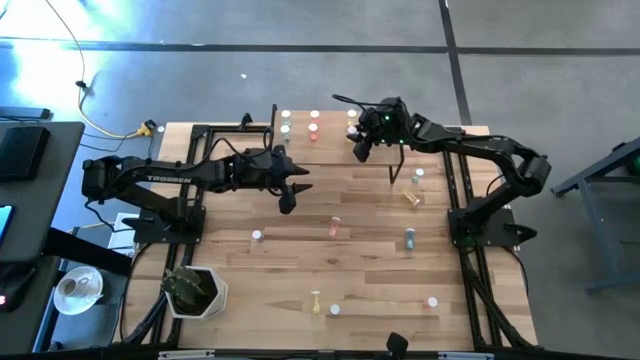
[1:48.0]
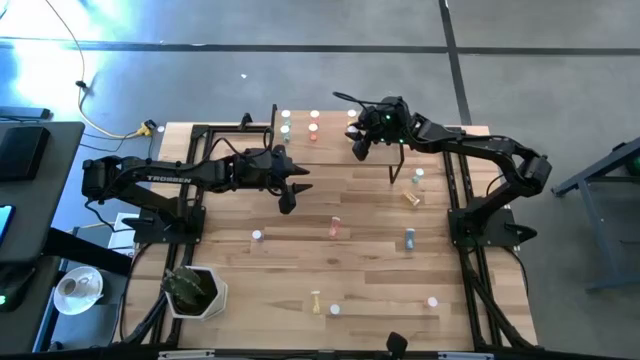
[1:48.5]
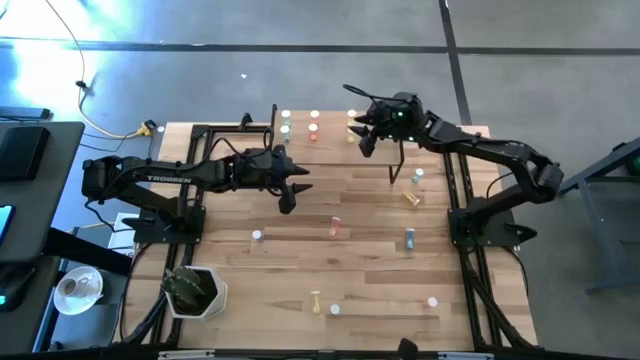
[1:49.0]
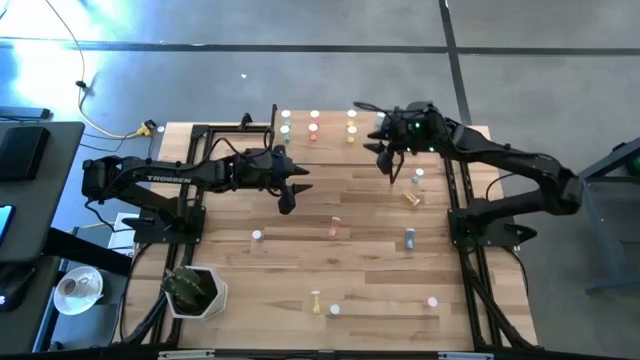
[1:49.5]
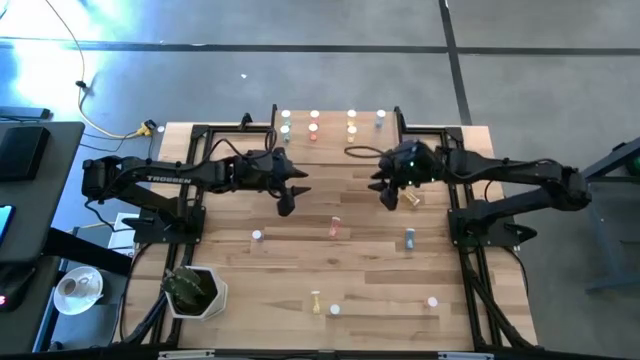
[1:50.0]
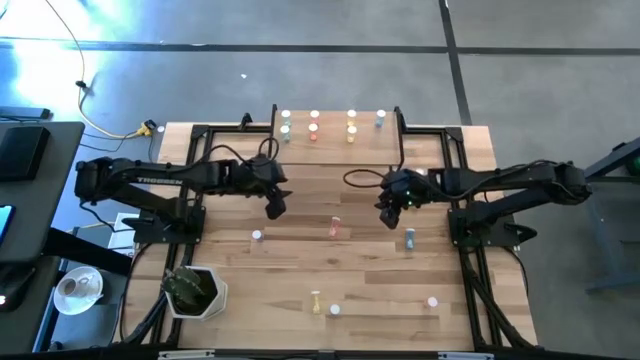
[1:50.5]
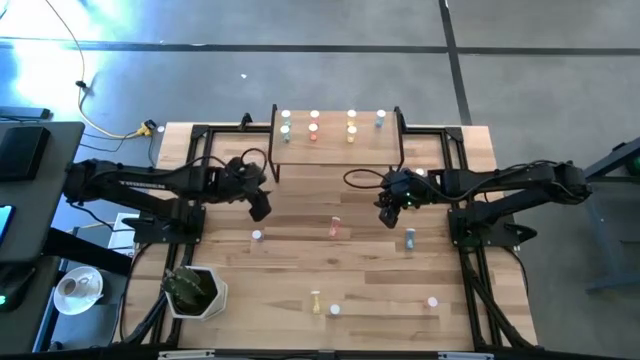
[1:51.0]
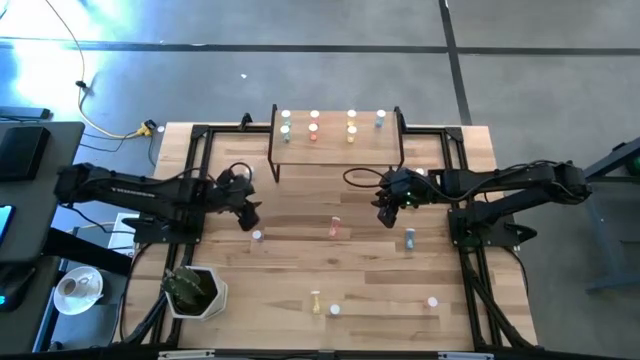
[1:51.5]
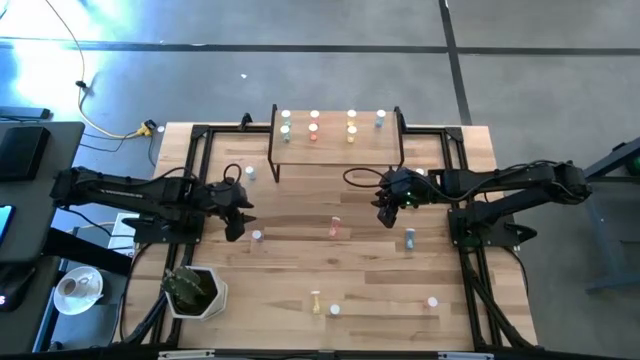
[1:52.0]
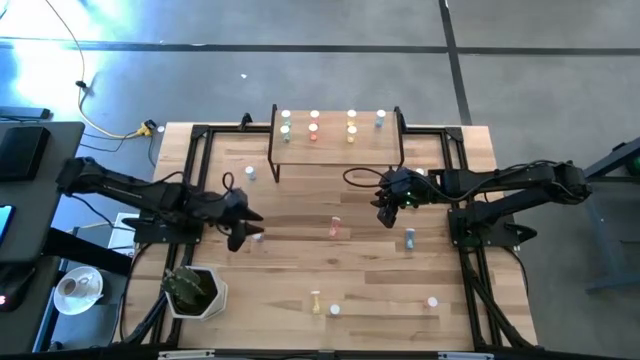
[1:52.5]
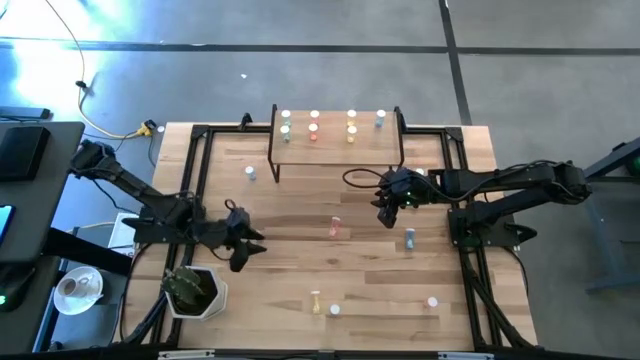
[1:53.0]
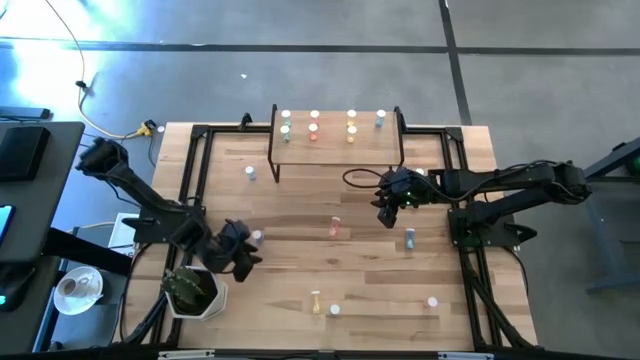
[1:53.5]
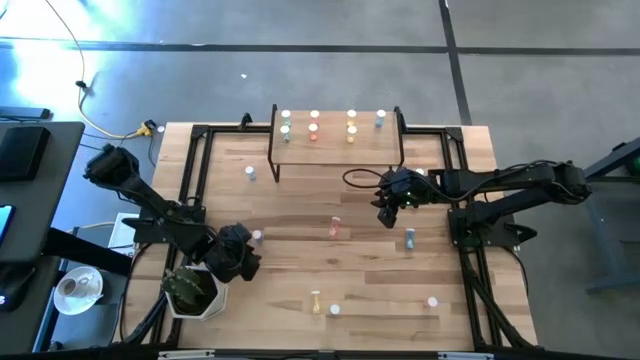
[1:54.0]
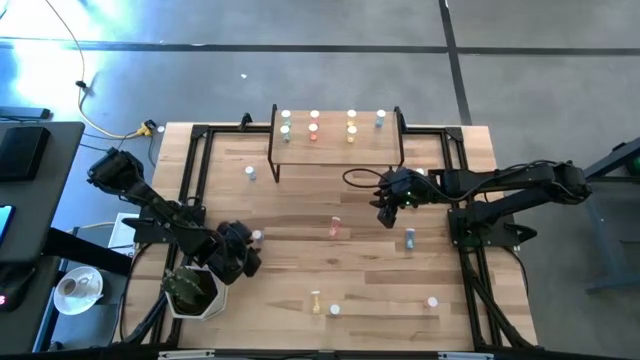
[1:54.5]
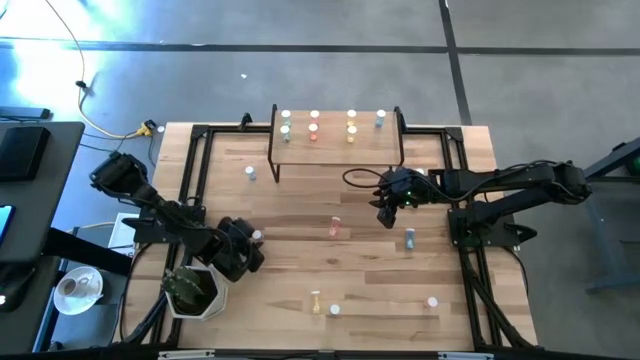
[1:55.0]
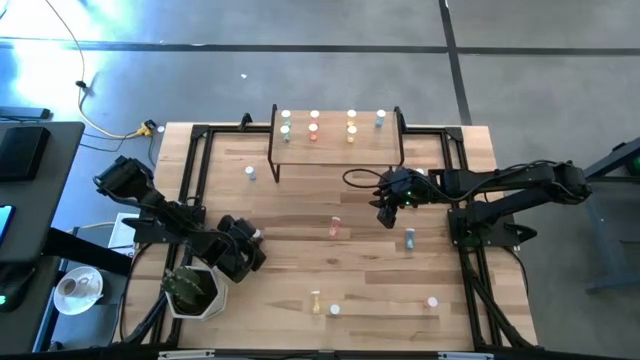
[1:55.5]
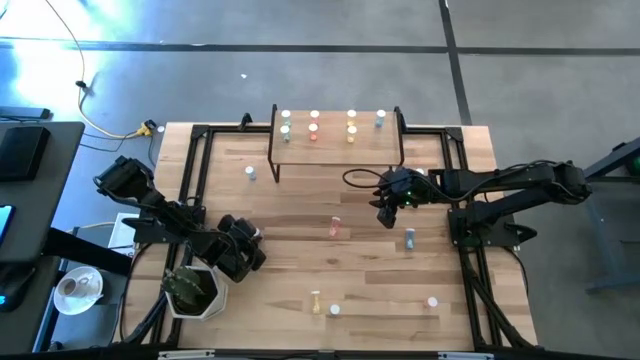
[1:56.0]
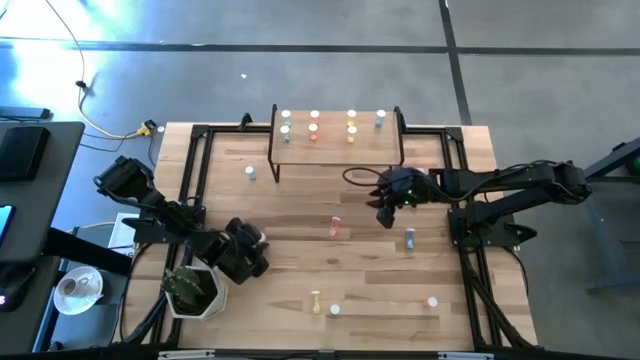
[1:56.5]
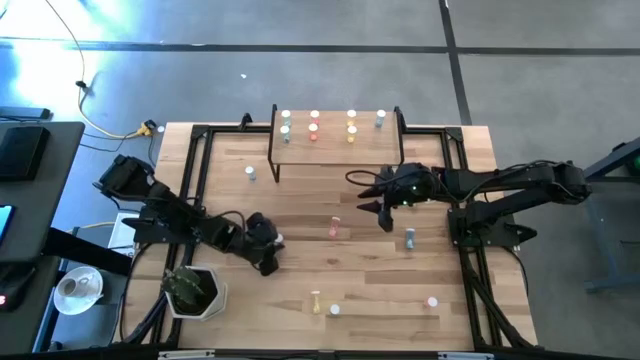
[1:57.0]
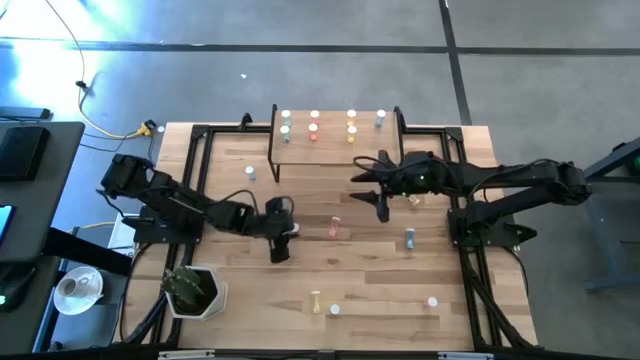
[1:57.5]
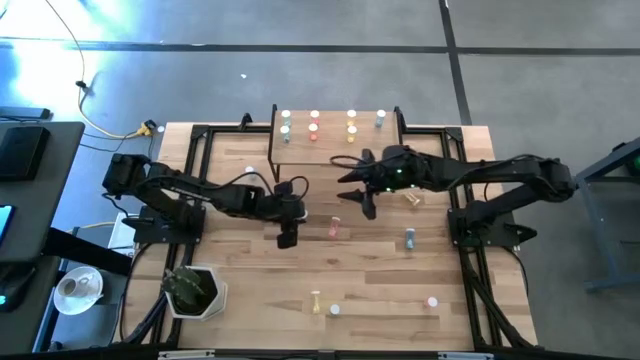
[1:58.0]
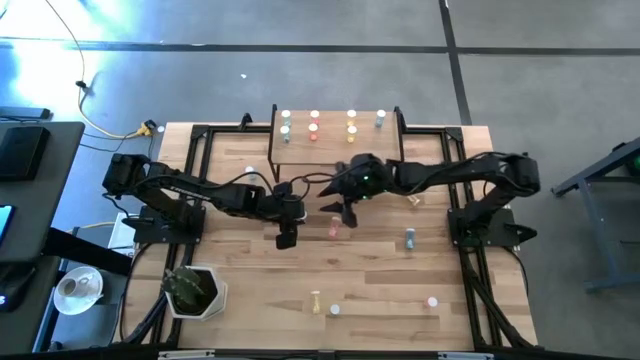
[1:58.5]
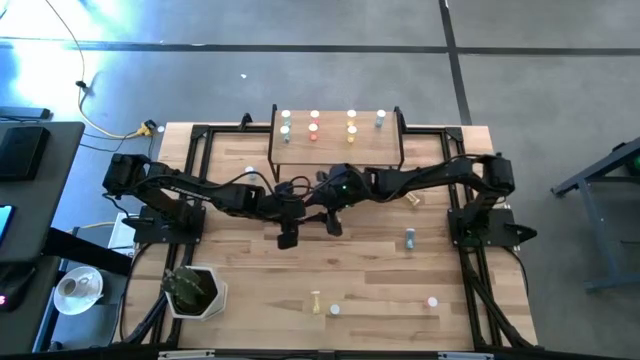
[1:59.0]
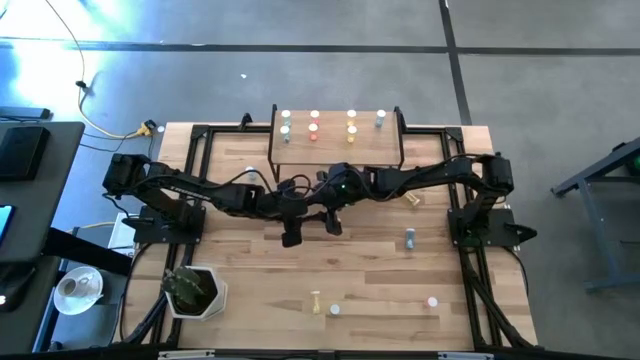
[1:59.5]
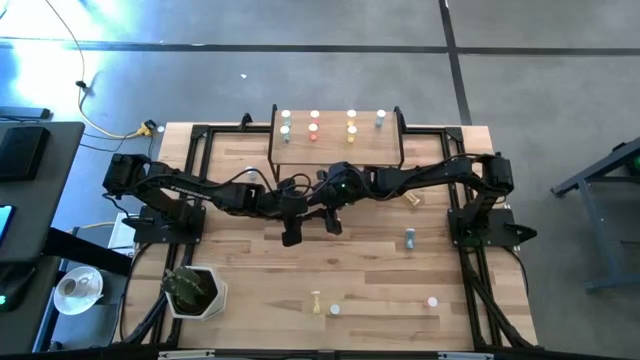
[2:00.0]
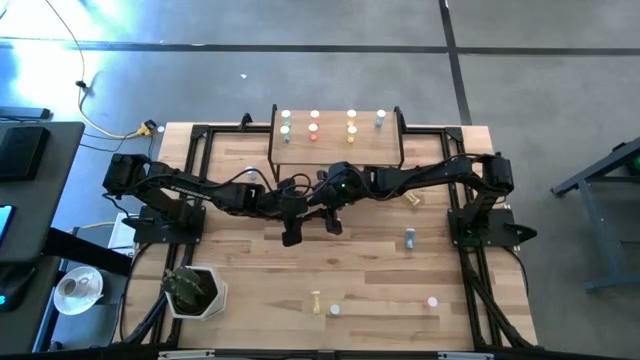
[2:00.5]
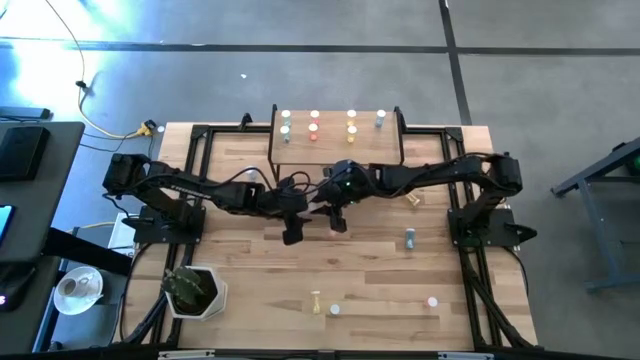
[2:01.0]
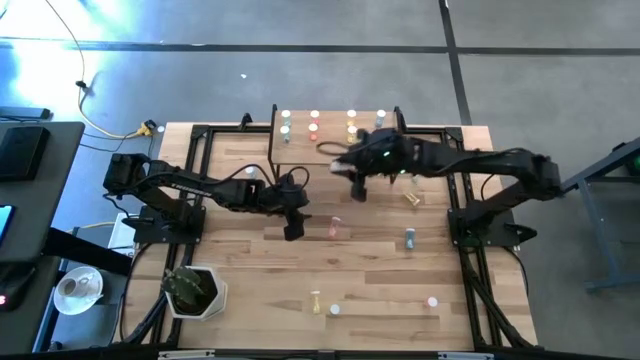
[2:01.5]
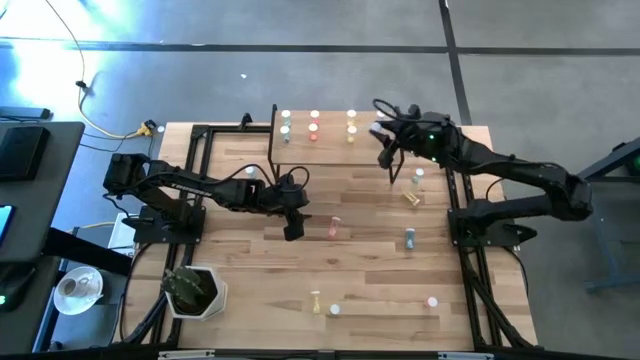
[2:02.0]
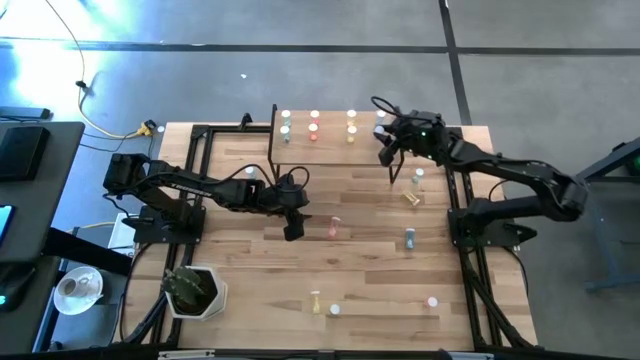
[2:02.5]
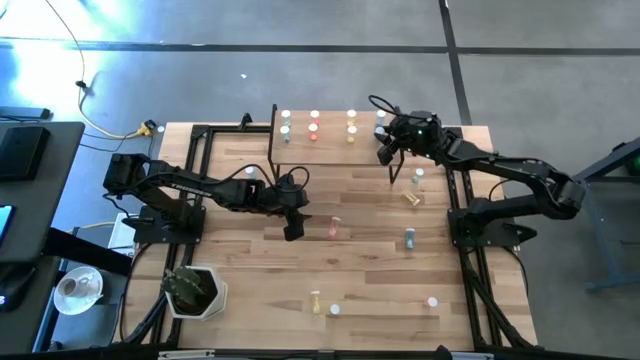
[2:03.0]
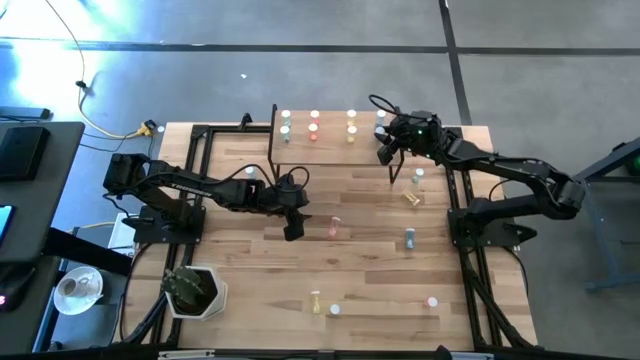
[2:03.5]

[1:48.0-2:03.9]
Task: Pick and place medicine bottles onto shelf by color
Put the blue pill bottle on the shelf

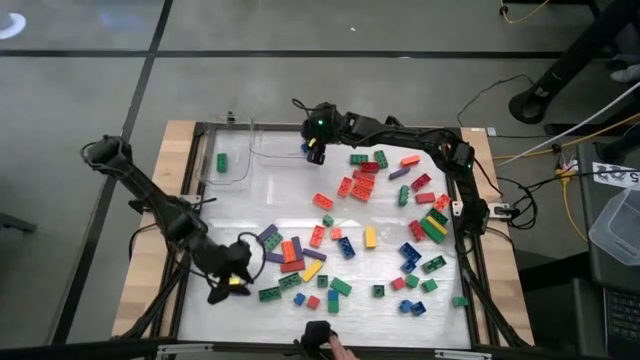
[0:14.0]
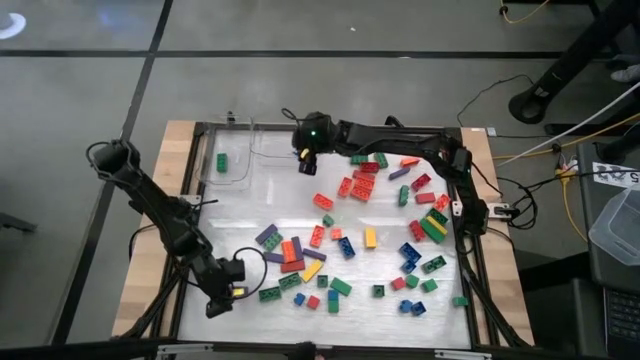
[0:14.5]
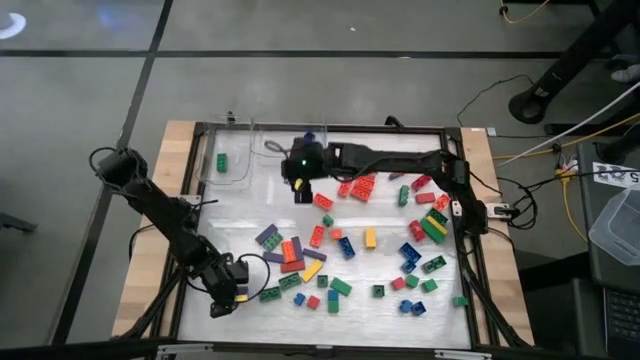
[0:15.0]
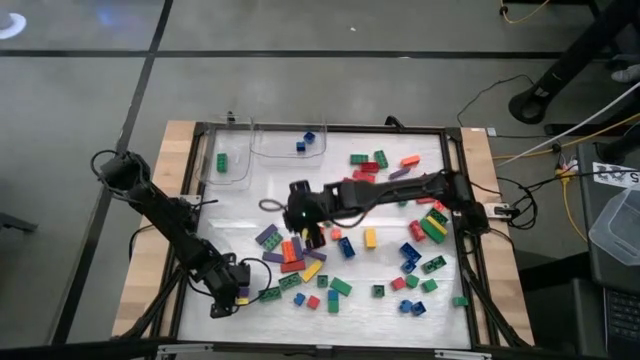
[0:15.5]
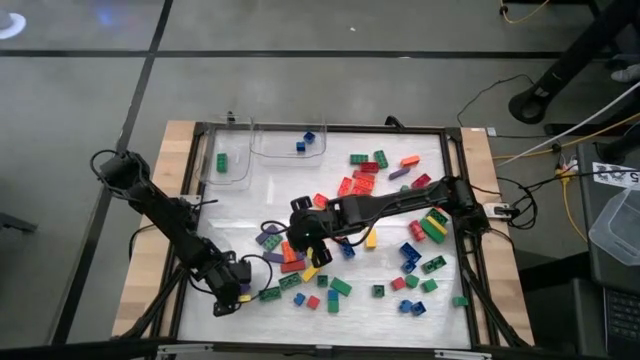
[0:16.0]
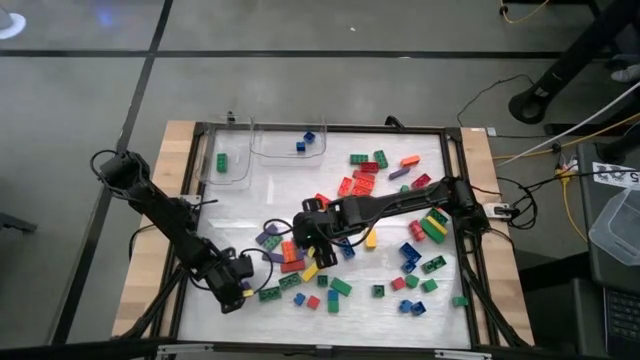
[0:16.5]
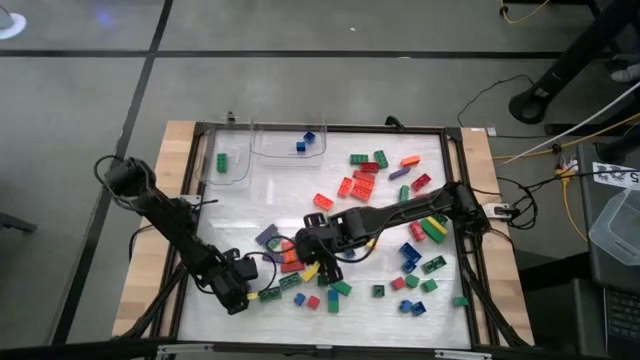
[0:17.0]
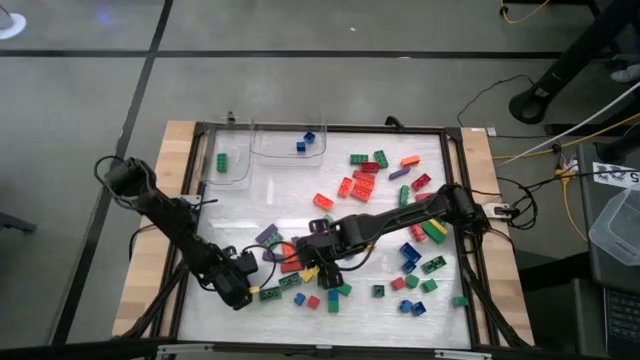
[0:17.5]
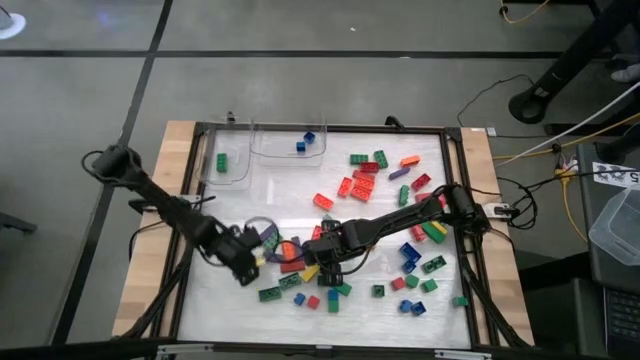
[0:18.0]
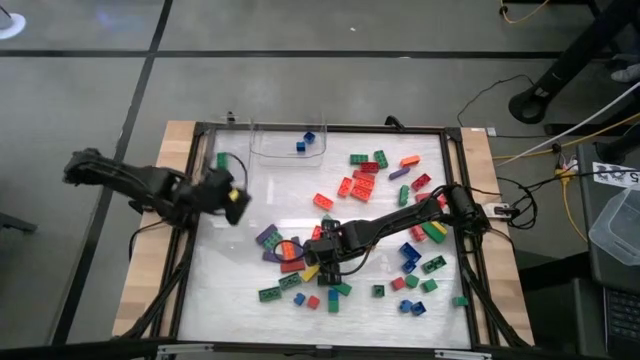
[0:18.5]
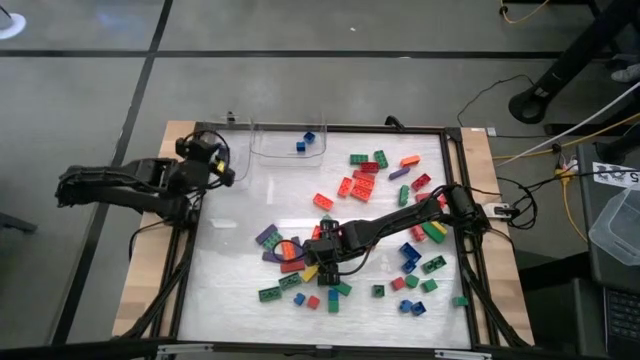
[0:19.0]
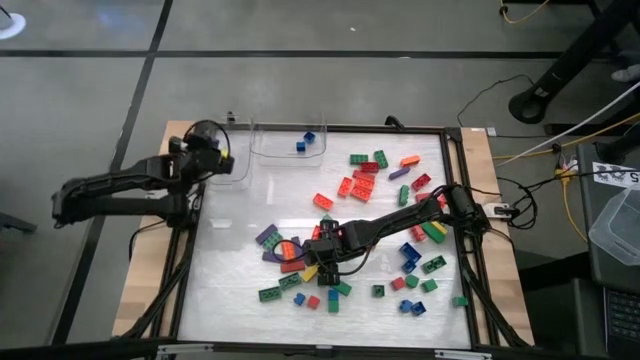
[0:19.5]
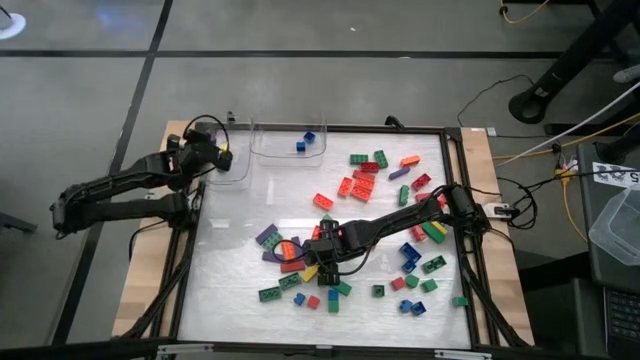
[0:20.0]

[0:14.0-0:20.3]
Task: Sort blocks by size
Put the large purple block into the left transparent bin
